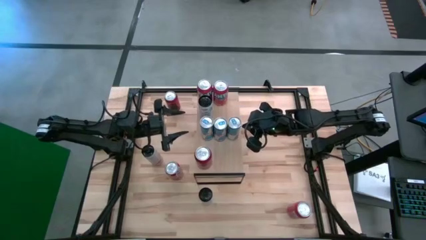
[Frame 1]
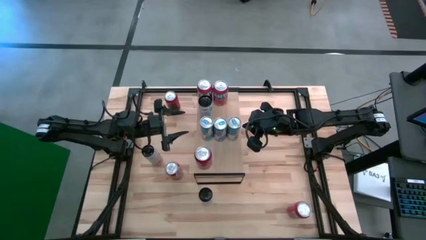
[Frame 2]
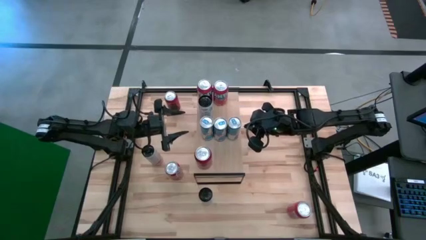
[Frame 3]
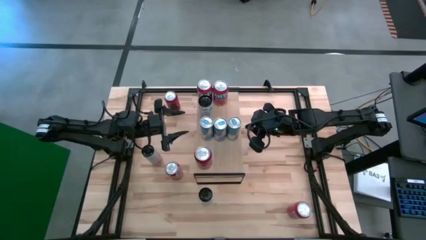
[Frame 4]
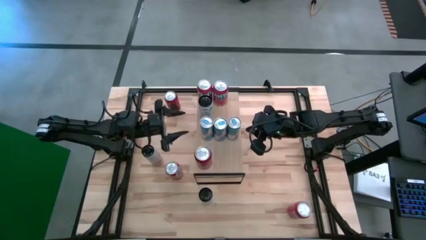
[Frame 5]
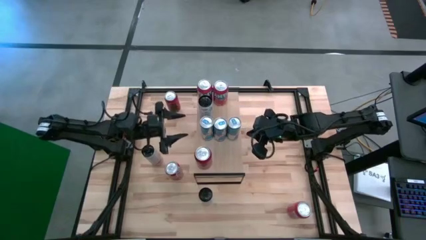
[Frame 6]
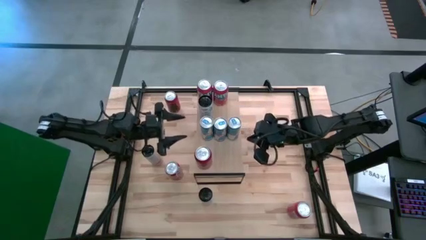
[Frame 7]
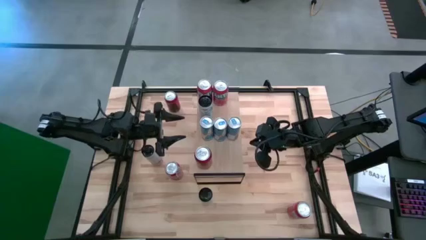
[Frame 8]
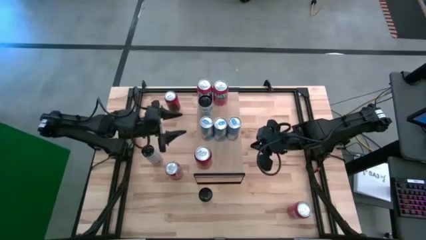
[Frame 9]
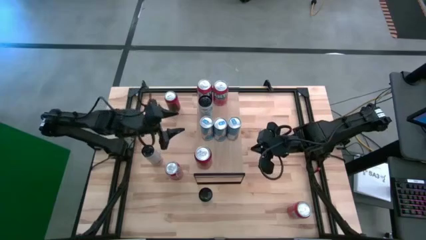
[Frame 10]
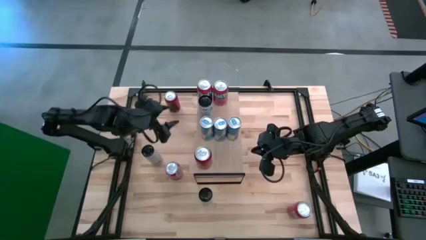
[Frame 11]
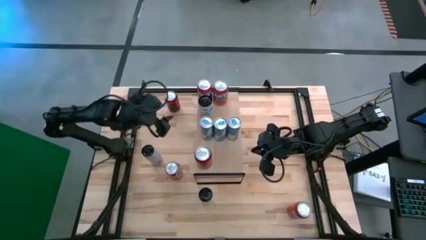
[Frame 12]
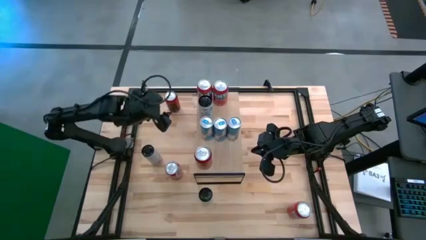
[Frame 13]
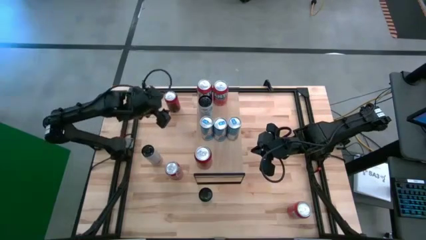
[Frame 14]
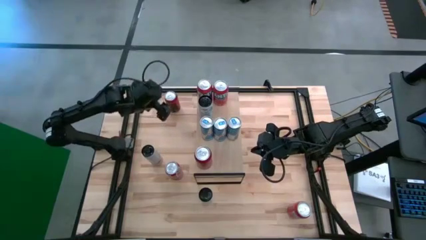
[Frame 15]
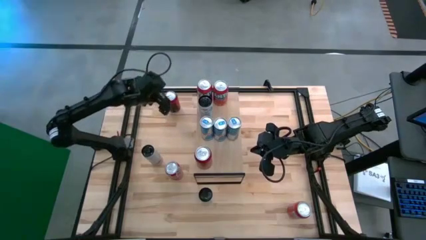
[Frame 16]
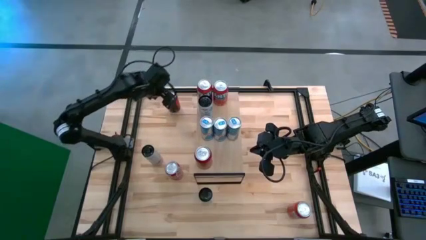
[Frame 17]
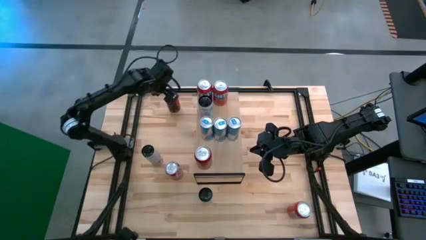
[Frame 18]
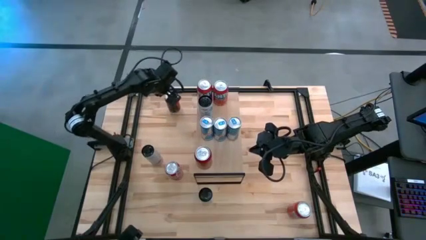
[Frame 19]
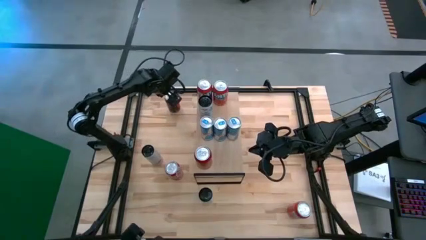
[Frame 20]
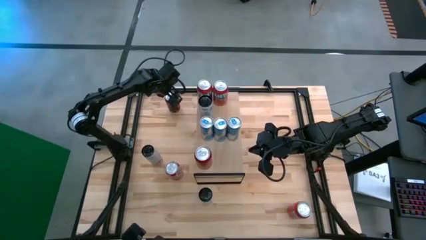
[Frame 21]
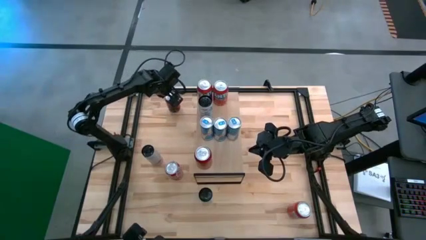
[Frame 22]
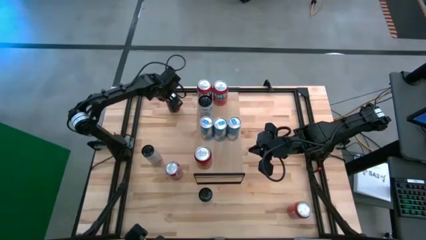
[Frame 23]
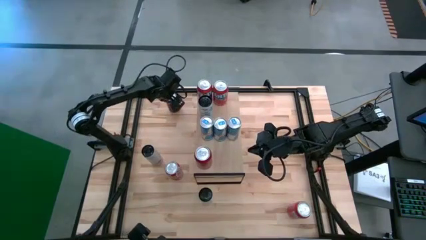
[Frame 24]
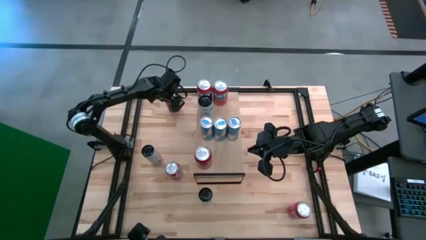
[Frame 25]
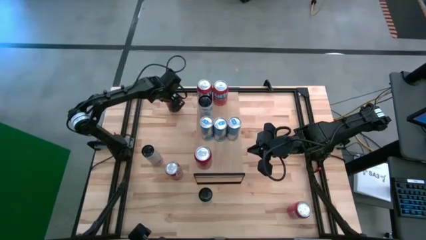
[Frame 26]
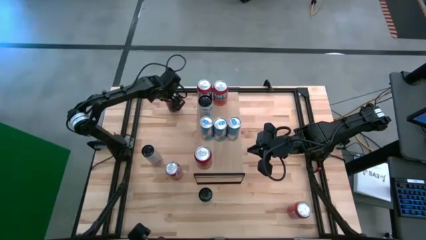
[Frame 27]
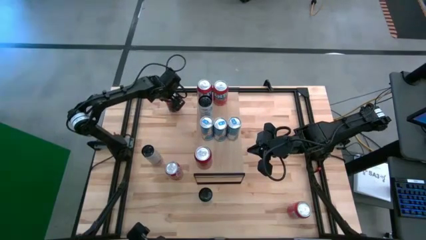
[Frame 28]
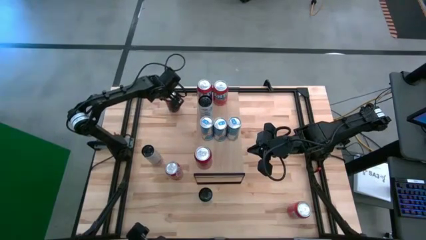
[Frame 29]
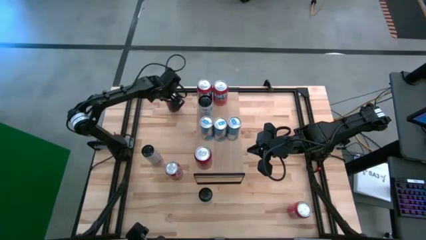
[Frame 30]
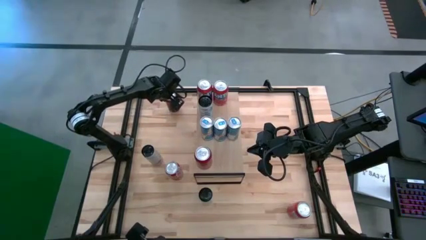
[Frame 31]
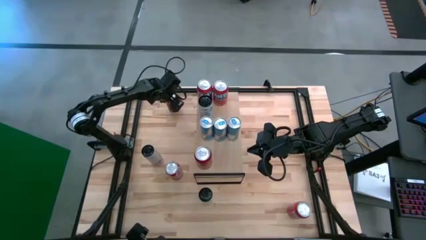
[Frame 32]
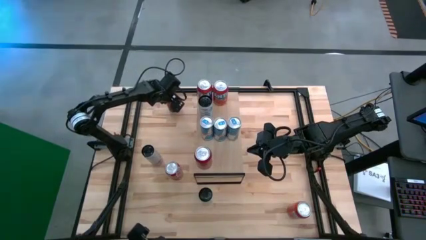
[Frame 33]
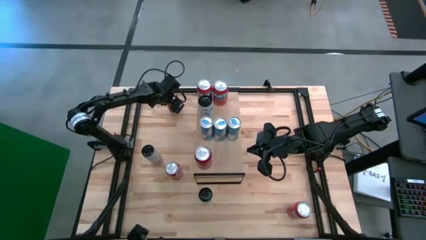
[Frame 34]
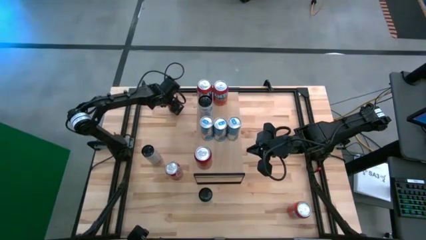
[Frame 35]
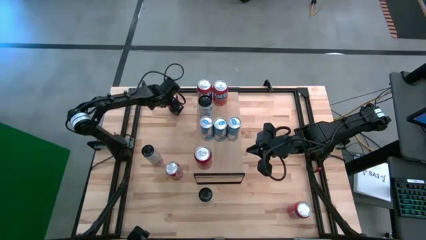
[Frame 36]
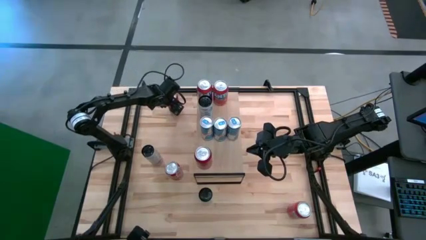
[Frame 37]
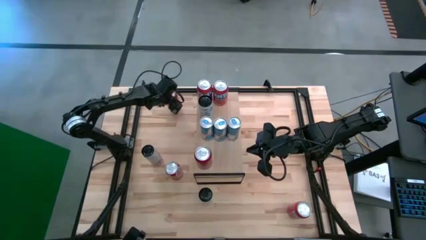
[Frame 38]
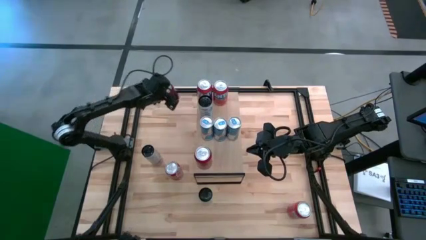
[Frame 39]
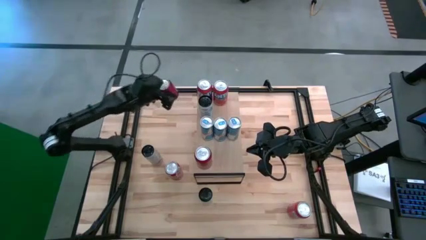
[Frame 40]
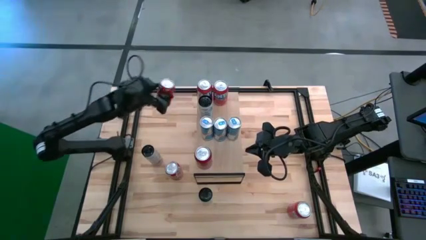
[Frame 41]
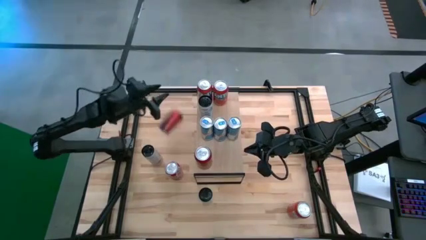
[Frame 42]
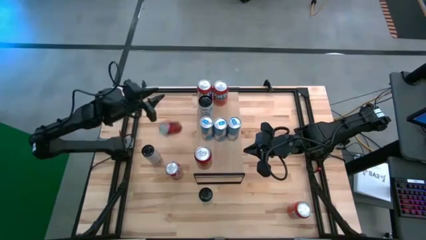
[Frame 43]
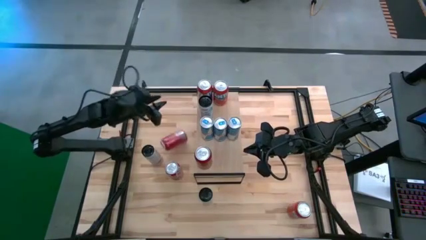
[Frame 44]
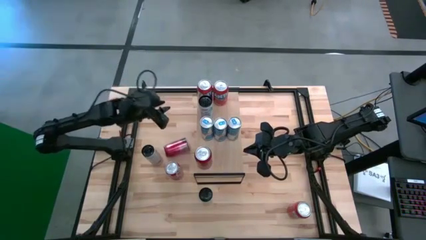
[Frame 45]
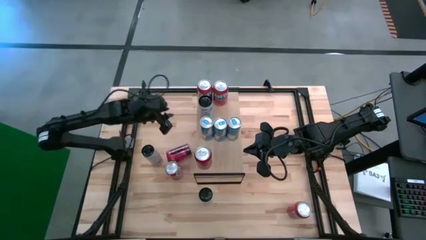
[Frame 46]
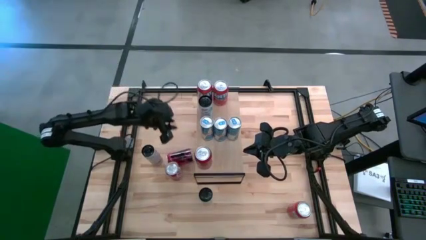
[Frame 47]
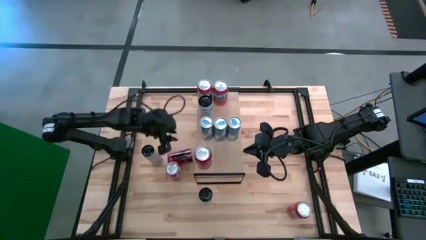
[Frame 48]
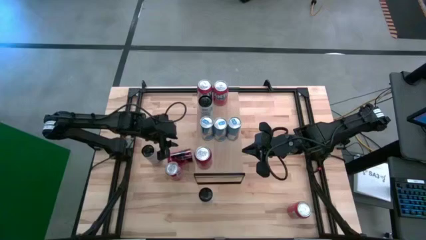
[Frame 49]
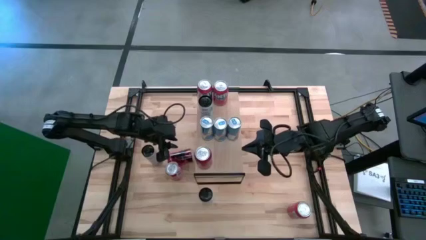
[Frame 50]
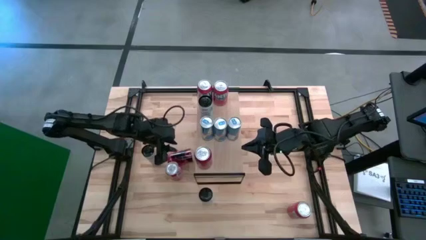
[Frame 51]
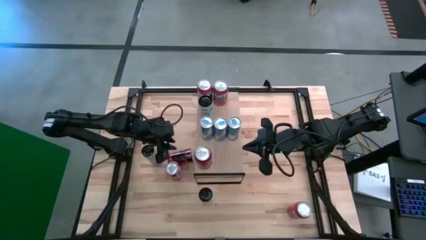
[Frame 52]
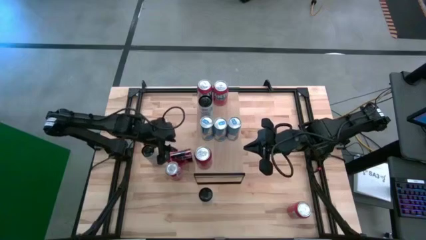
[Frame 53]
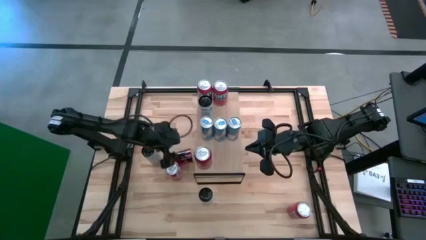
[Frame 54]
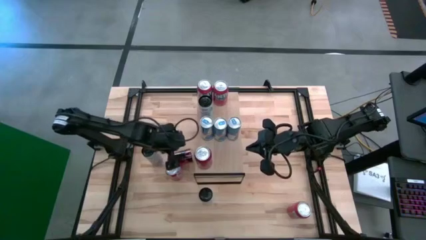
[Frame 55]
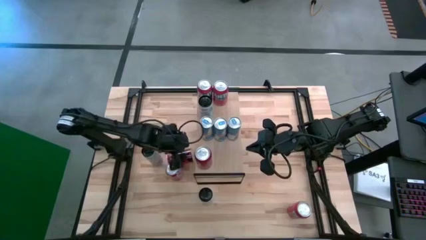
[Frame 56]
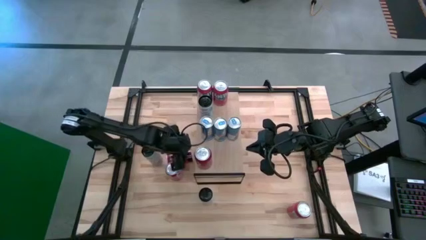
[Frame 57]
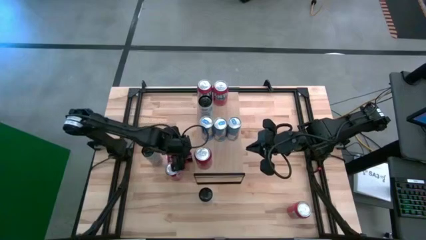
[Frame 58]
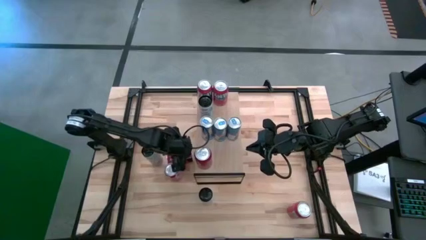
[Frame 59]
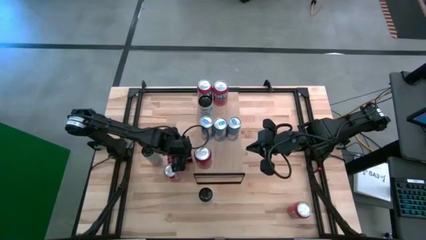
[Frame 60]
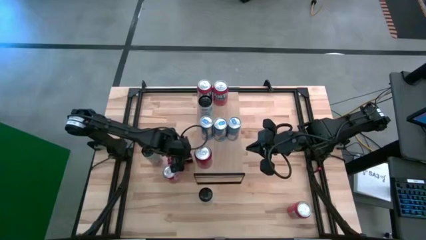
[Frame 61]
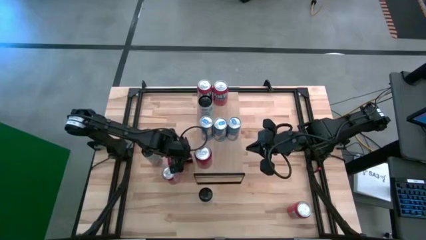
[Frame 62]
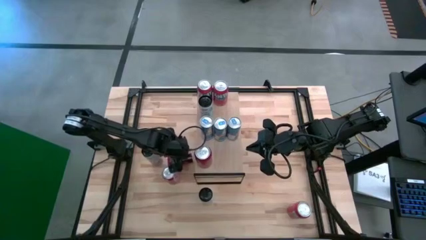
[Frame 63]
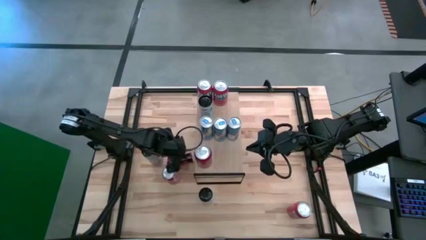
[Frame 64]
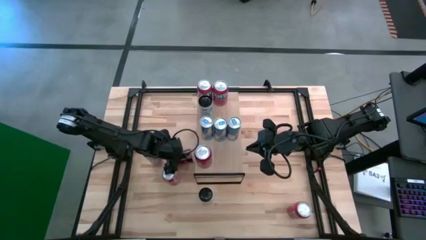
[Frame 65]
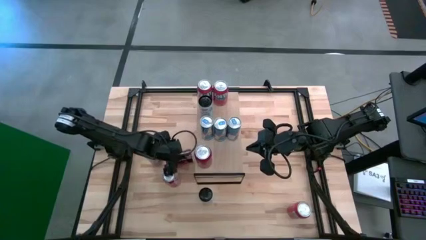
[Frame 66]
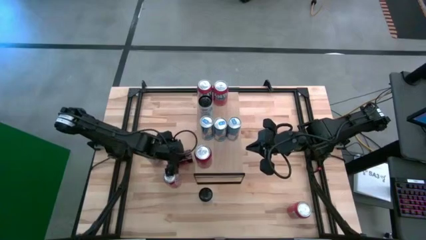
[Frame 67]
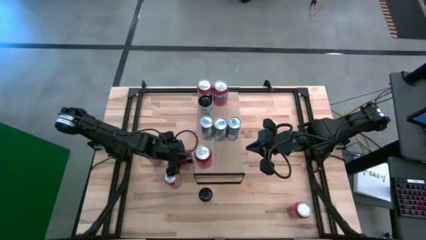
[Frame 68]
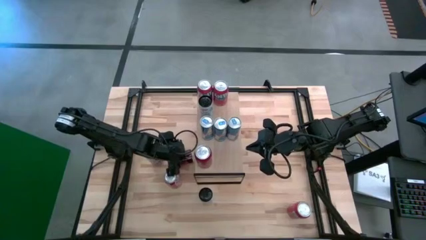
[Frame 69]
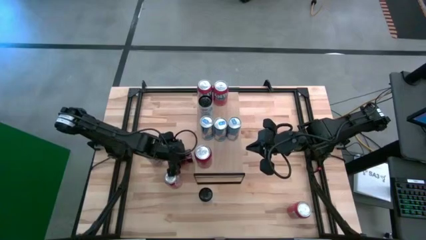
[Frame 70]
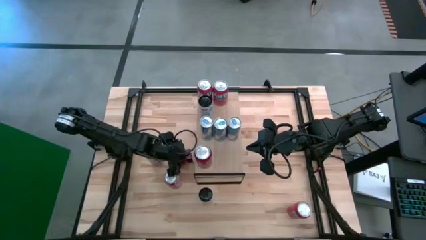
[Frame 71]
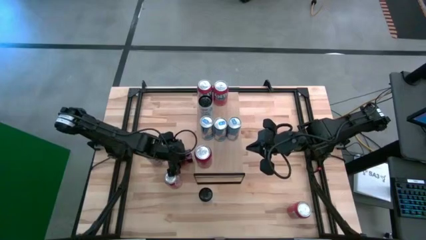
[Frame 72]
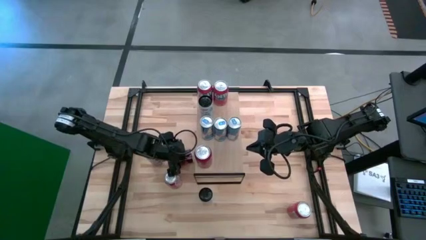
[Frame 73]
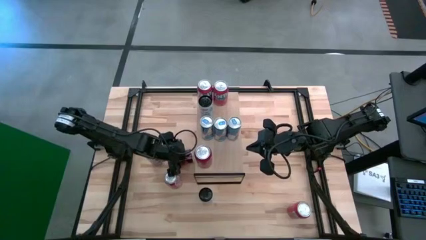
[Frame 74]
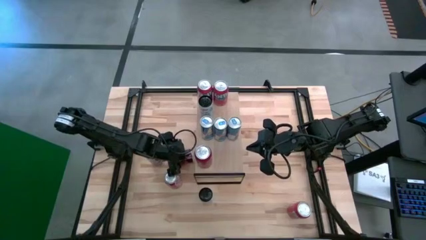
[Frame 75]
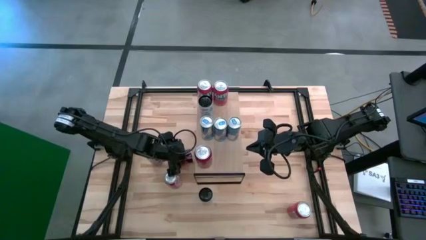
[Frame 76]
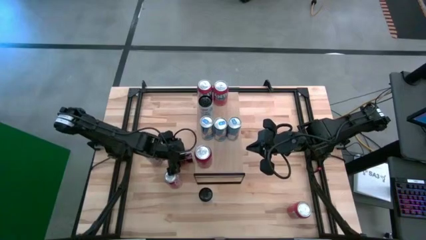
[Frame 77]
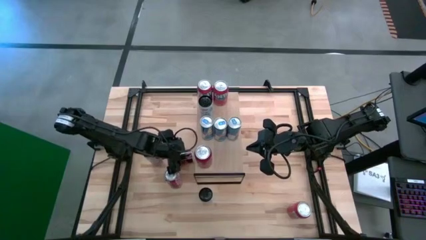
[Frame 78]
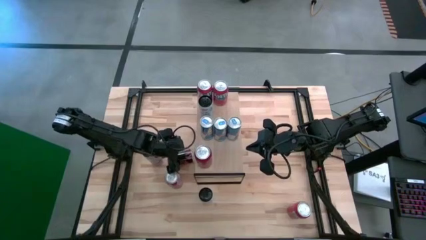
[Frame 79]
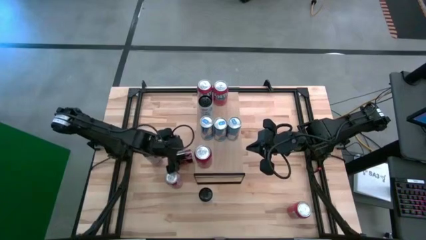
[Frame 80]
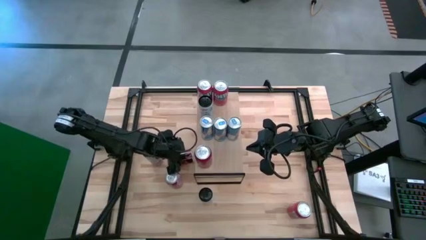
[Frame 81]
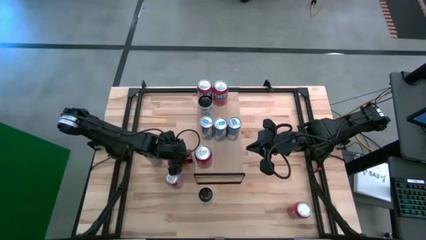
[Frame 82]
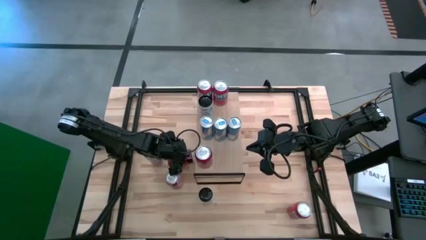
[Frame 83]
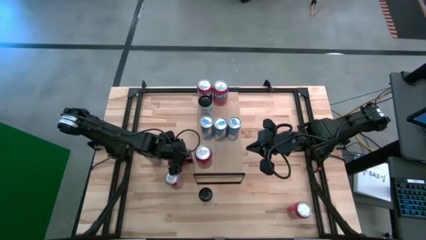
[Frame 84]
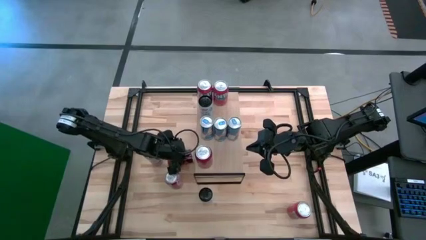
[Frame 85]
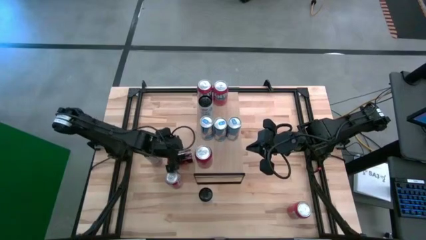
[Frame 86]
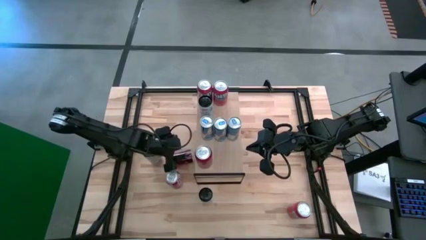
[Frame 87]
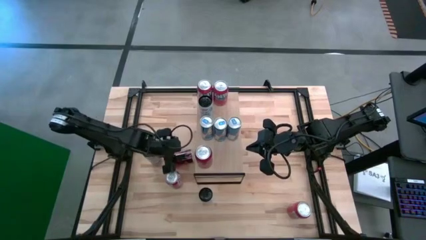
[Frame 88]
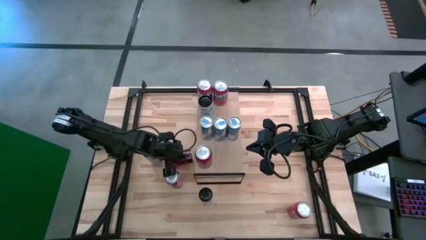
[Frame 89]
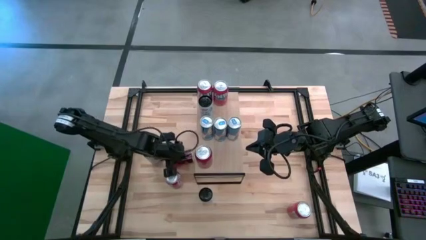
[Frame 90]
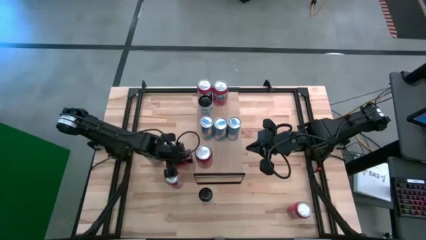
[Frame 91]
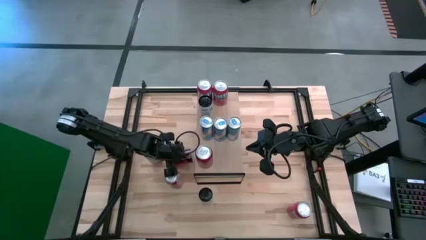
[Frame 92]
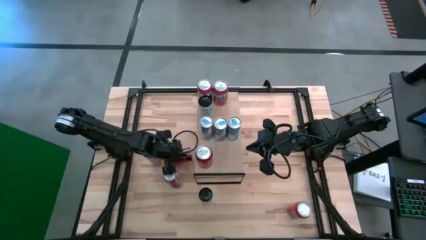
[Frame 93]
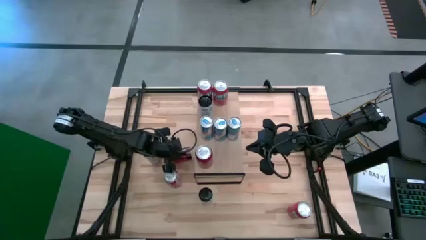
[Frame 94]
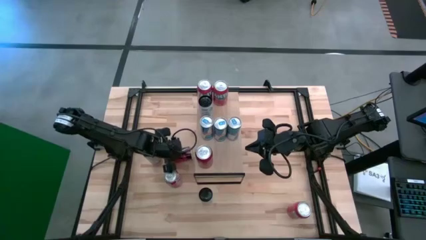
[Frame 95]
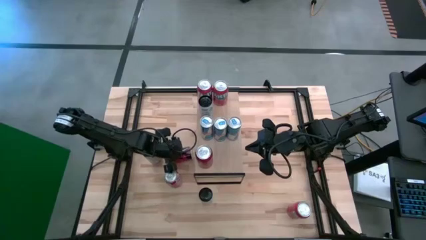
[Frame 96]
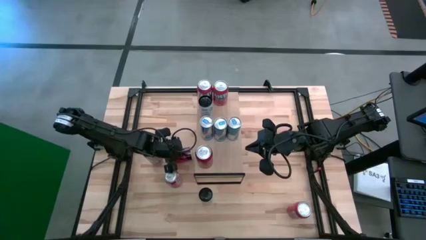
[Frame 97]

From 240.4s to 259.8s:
Task: Place canned beverage on shelf
Put the red black soda can on the shelf
